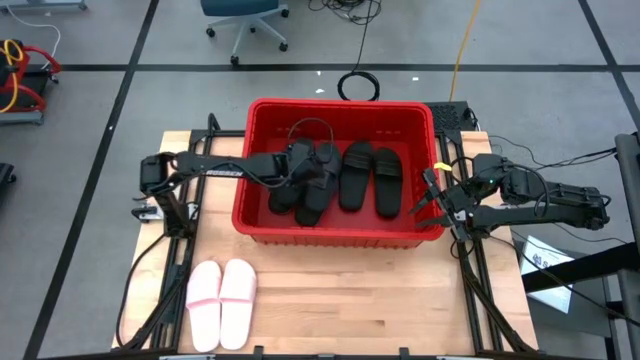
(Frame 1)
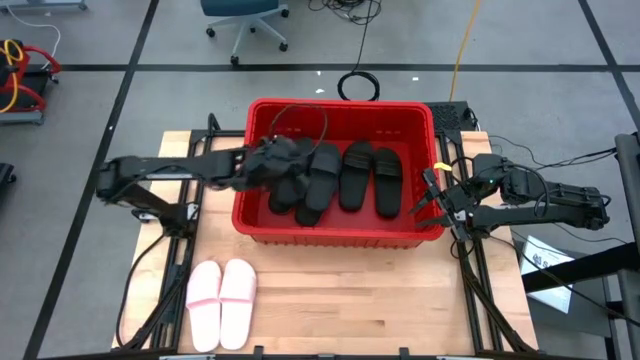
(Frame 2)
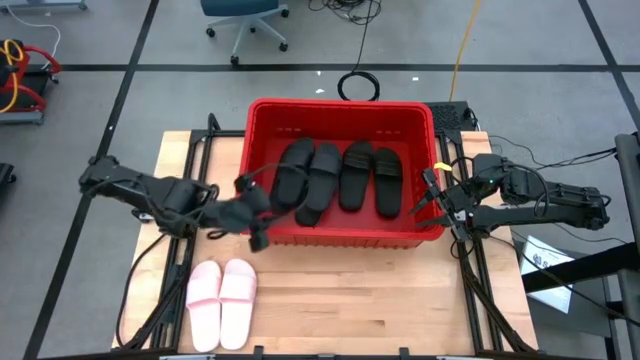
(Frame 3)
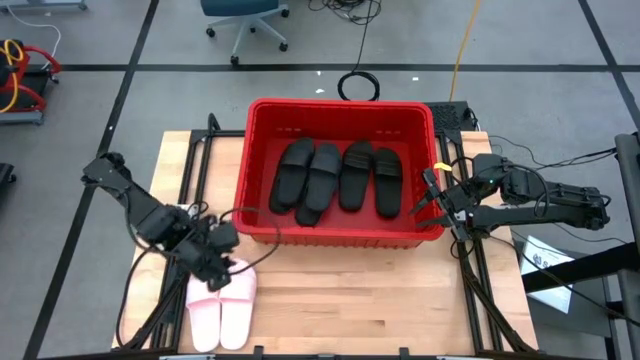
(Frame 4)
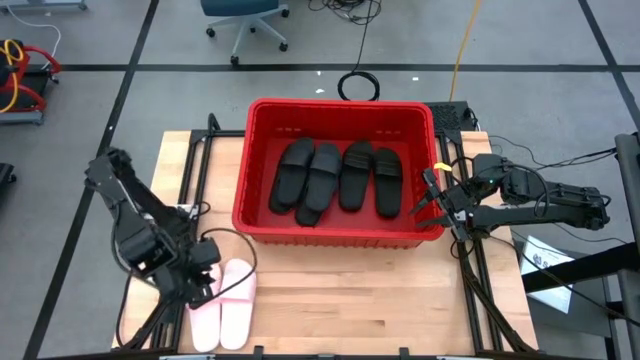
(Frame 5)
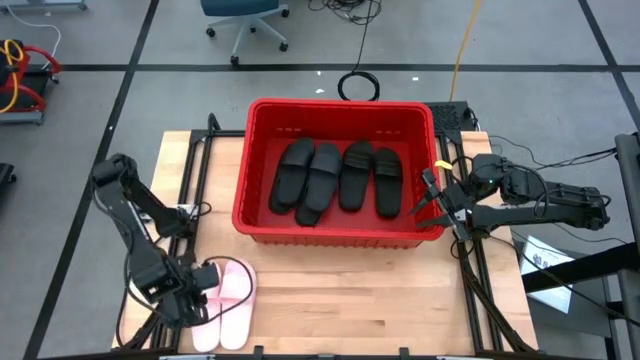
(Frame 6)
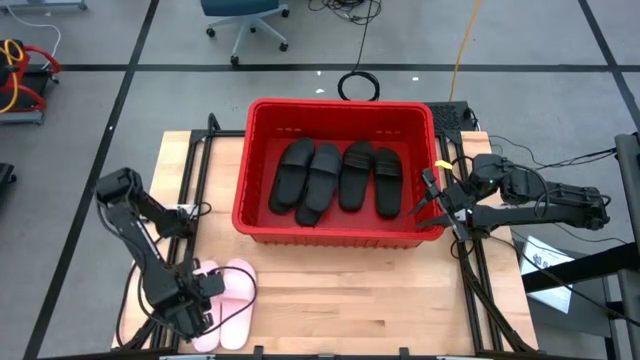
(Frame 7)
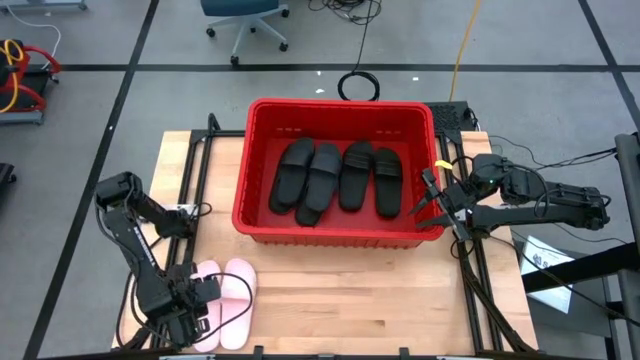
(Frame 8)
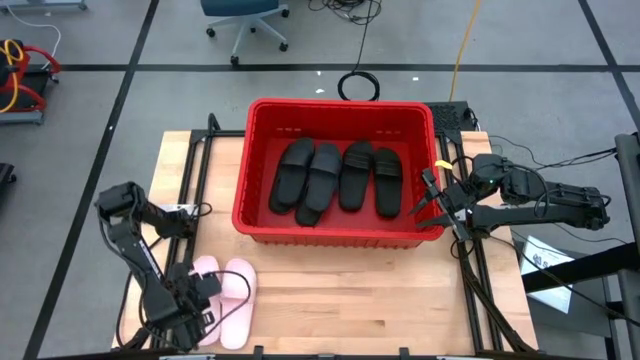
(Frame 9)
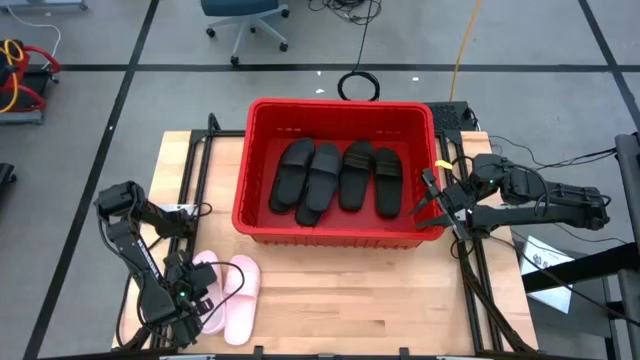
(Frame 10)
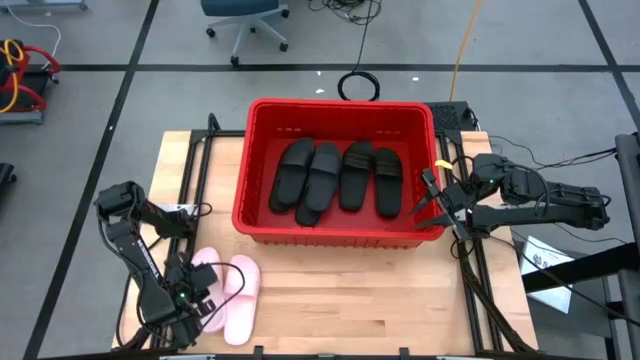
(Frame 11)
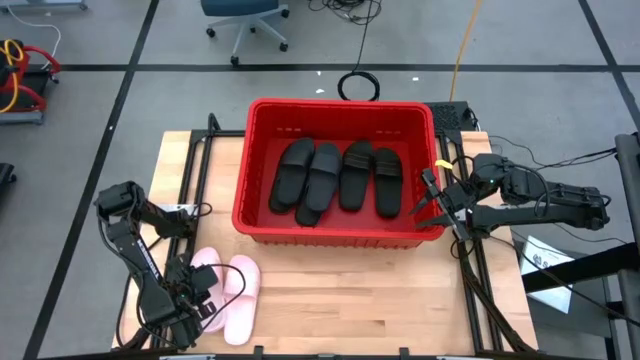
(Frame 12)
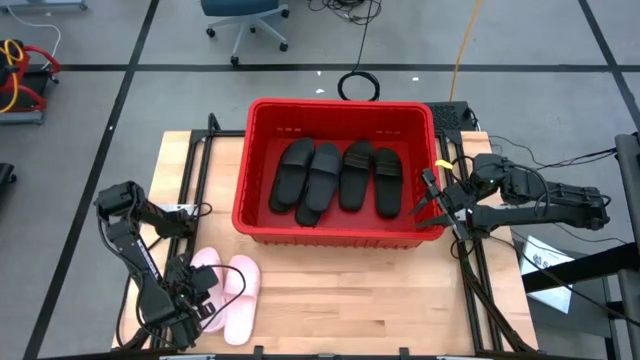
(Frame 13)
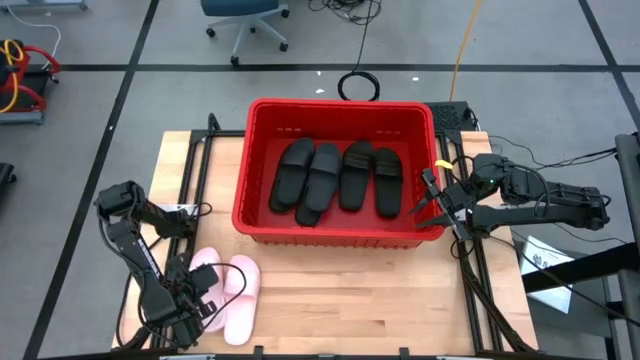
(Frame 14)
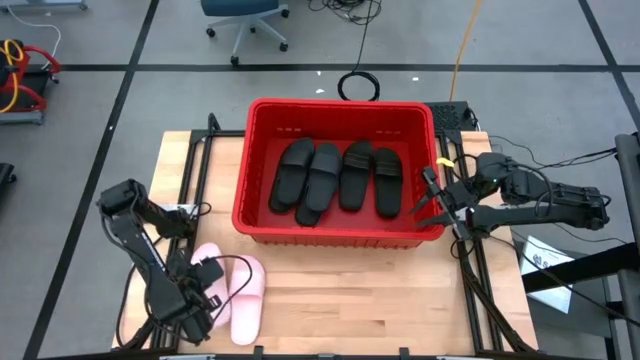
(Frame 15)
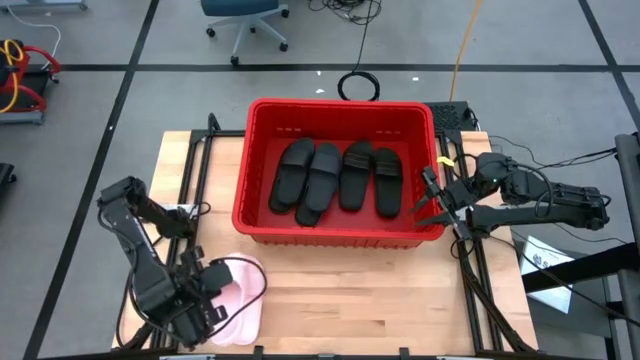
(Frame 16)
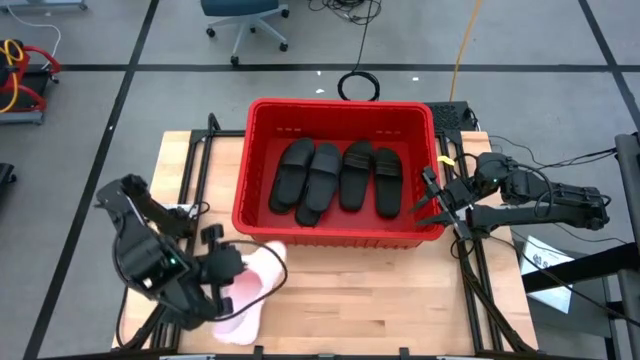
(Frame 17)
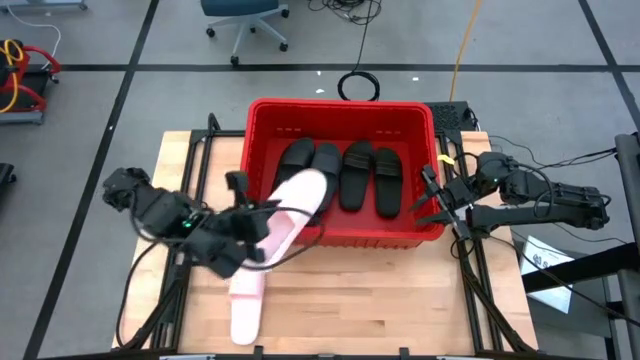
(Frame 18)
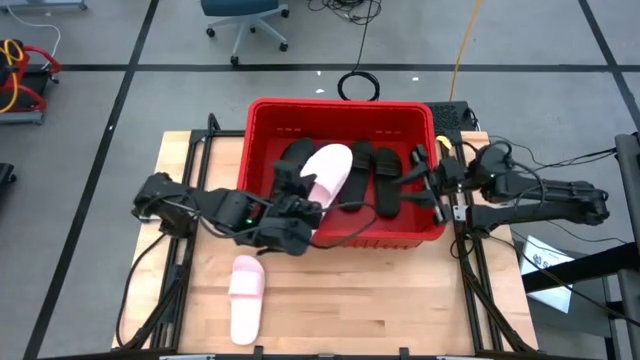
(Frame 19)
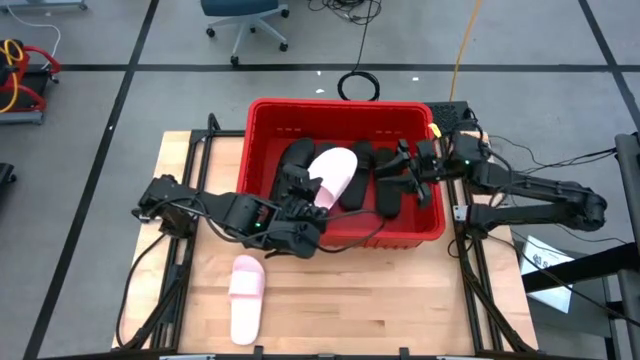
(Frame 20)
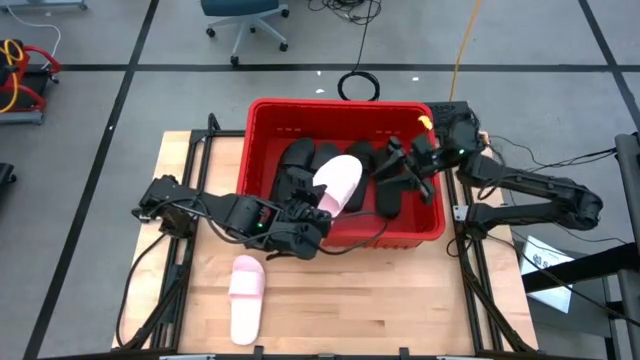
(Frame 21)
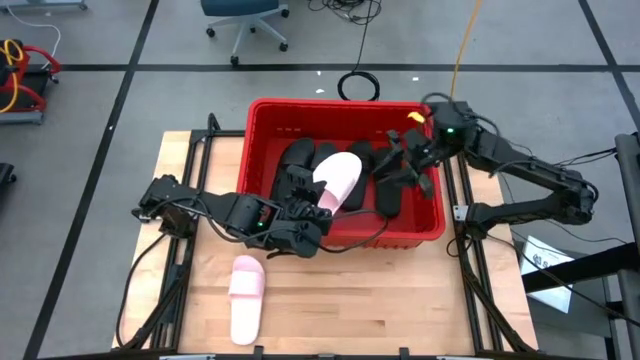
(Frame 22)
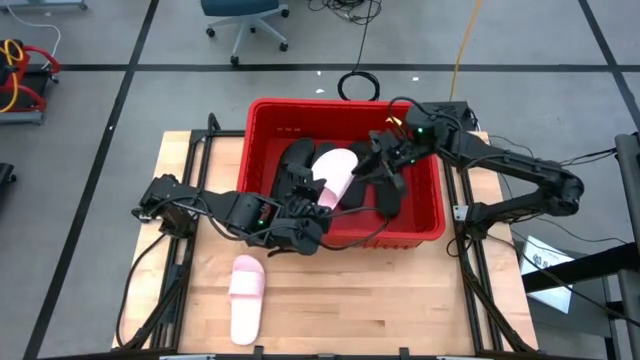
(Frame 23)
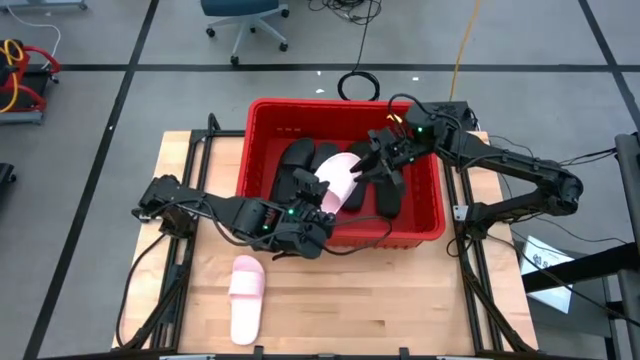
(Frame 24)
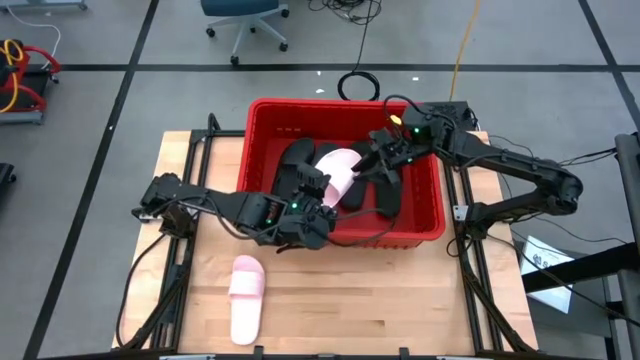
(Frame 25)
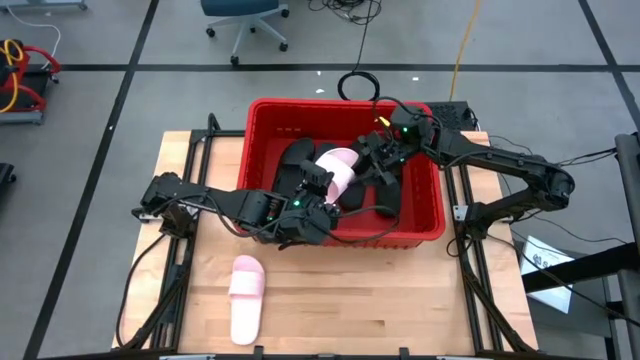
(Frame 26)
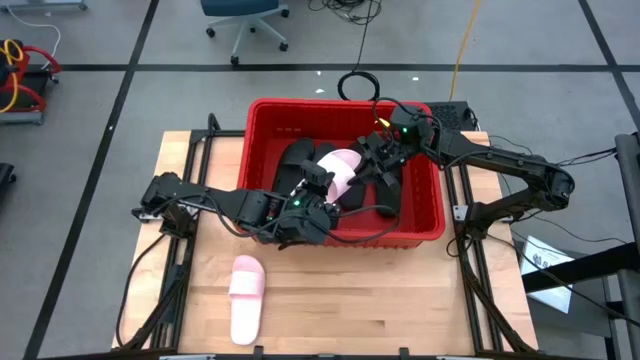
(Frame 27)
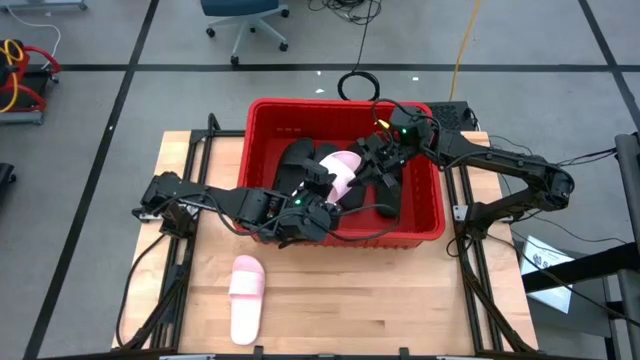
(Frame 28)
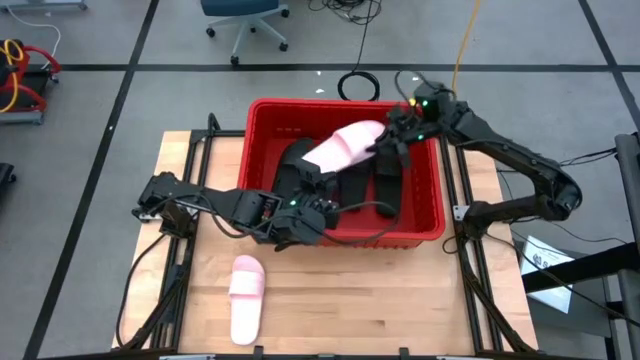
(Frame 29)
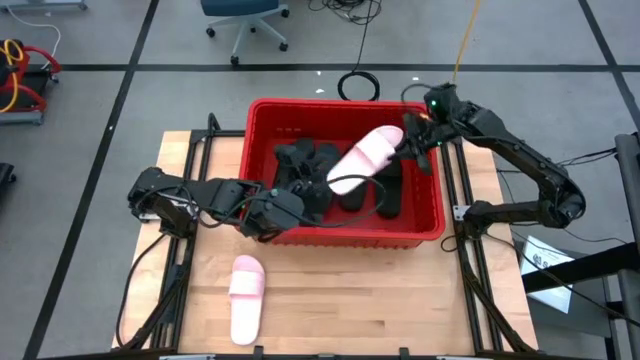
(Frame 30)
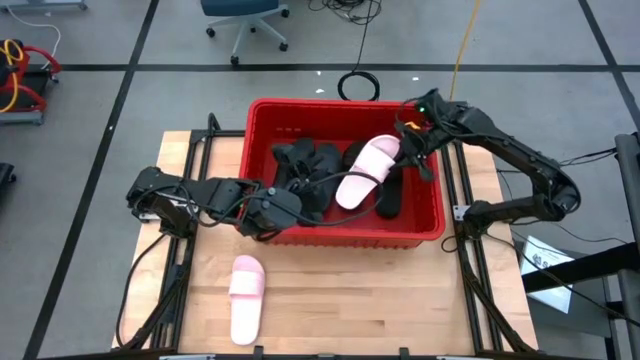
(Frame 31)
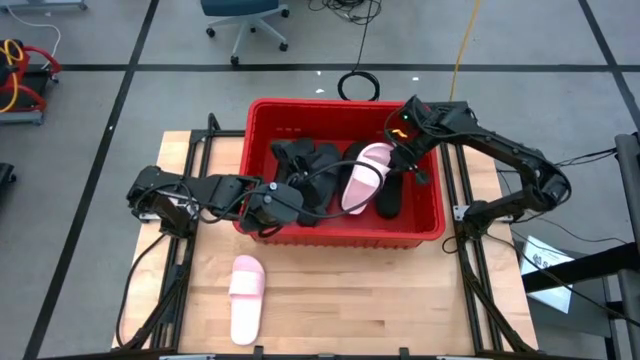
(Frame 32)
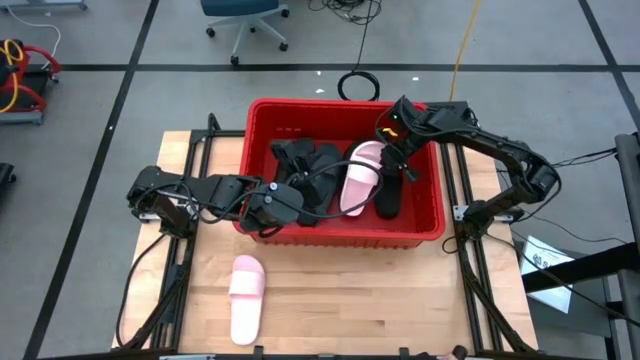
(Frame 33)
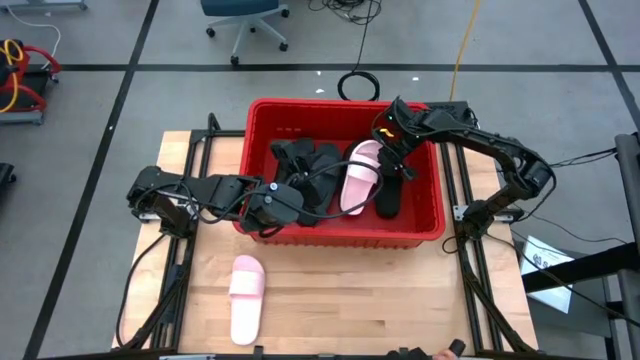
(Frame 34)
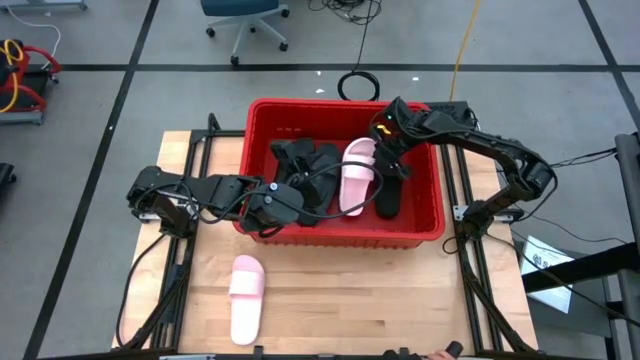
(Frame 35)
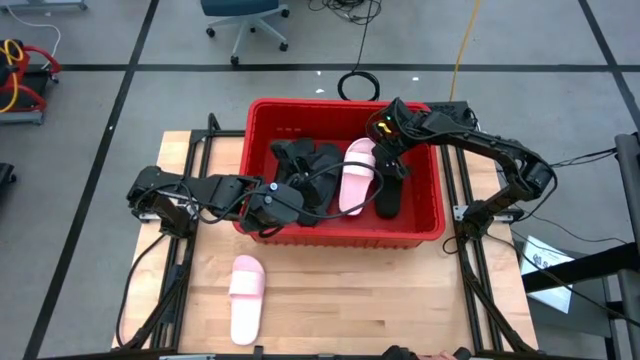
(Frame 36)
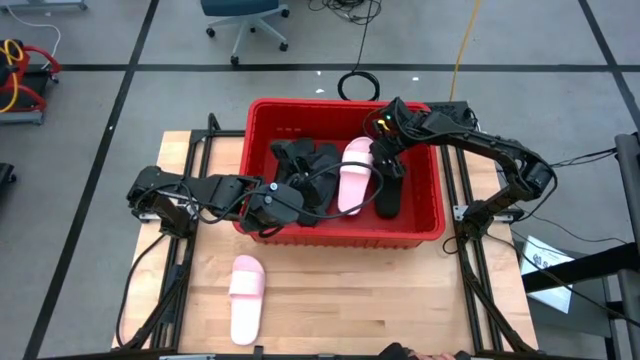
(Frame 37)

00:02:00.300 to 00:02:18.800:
Task: Pick and place slides into bin
Put the pink slide into the red bin
